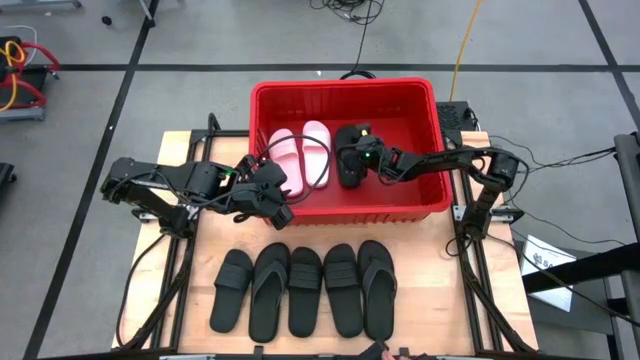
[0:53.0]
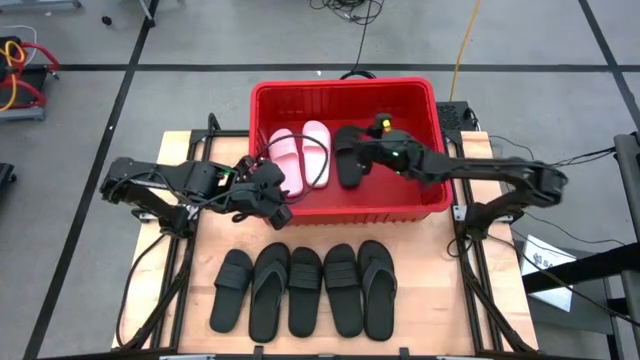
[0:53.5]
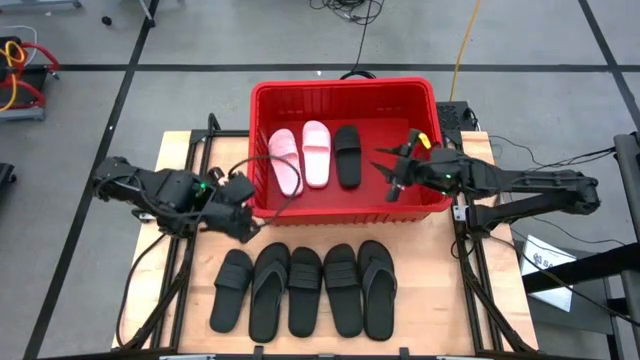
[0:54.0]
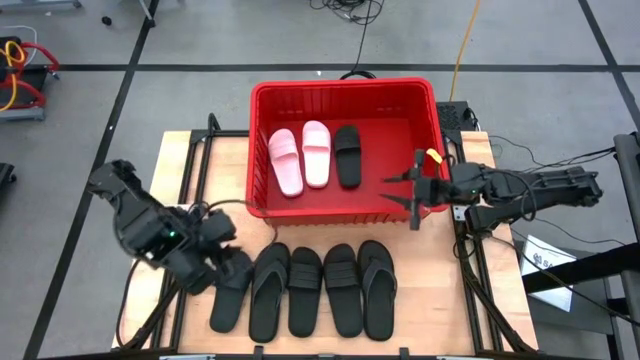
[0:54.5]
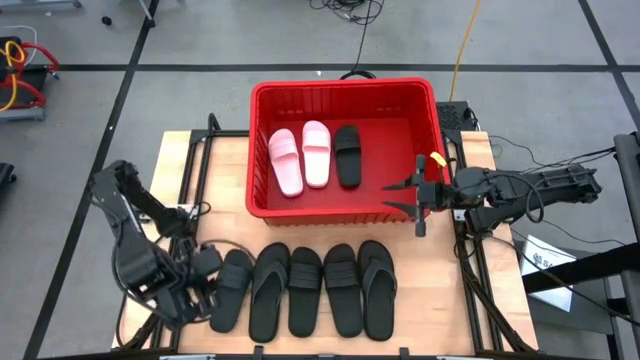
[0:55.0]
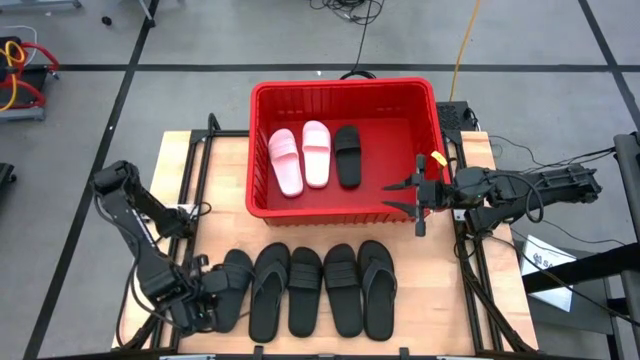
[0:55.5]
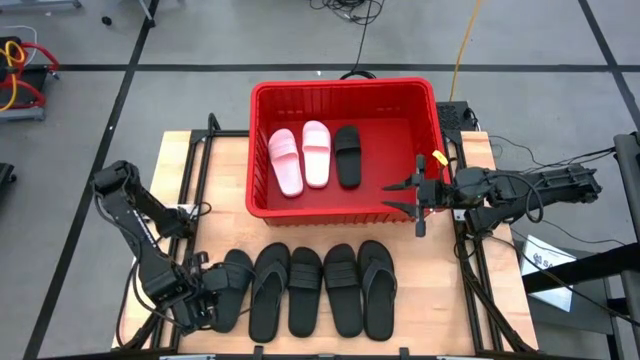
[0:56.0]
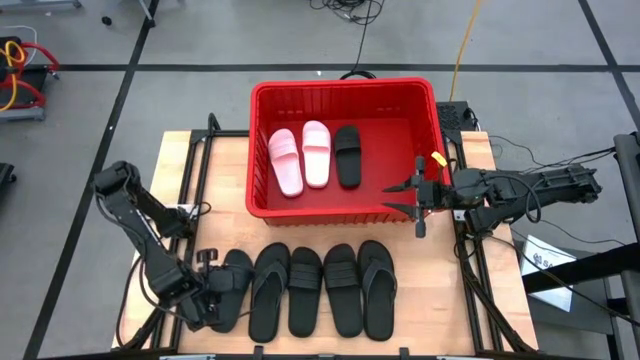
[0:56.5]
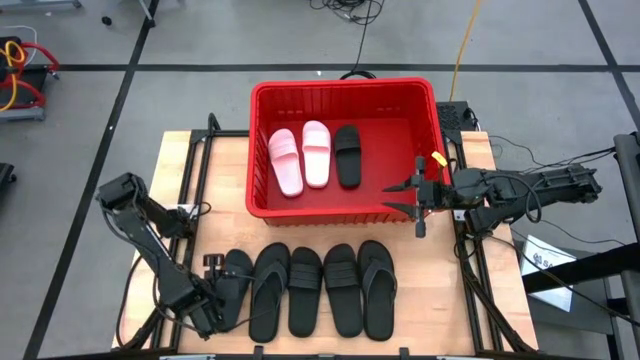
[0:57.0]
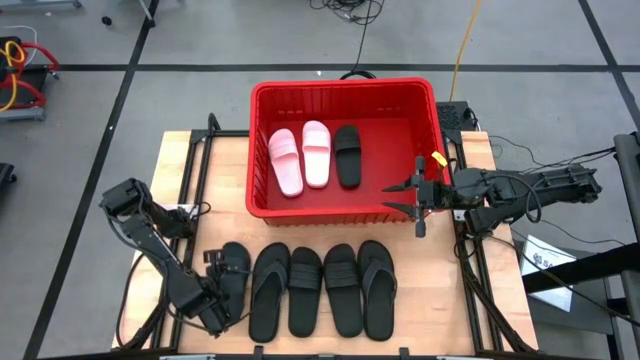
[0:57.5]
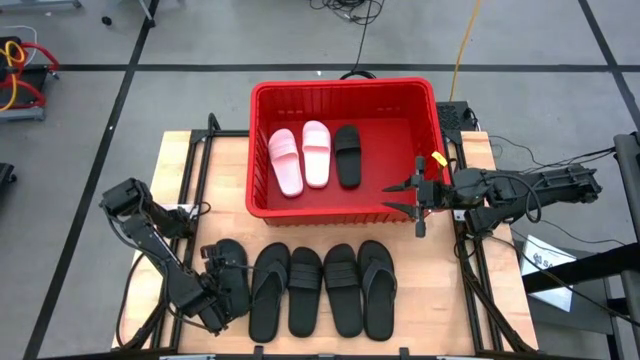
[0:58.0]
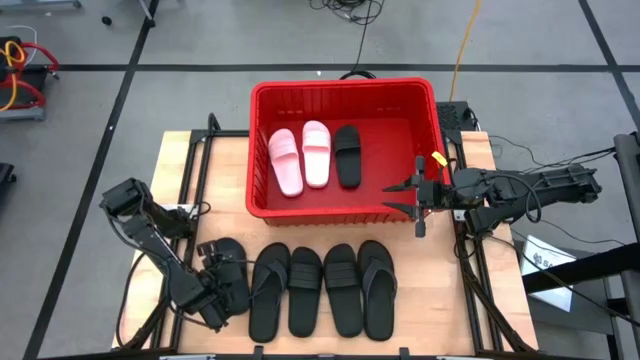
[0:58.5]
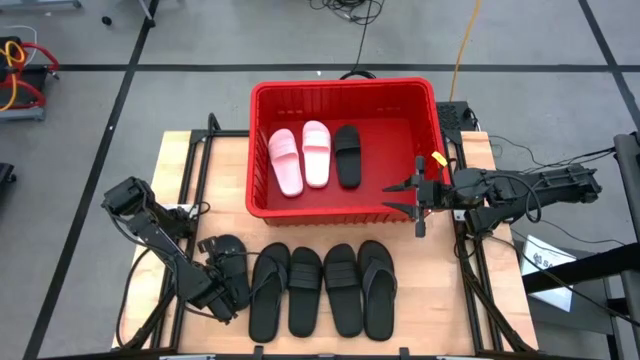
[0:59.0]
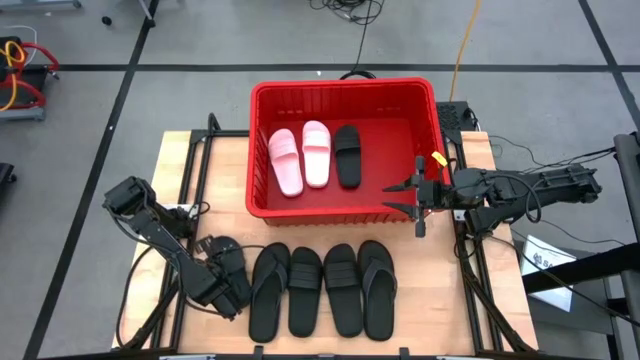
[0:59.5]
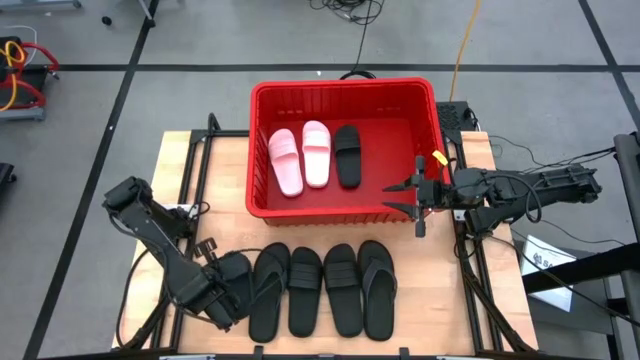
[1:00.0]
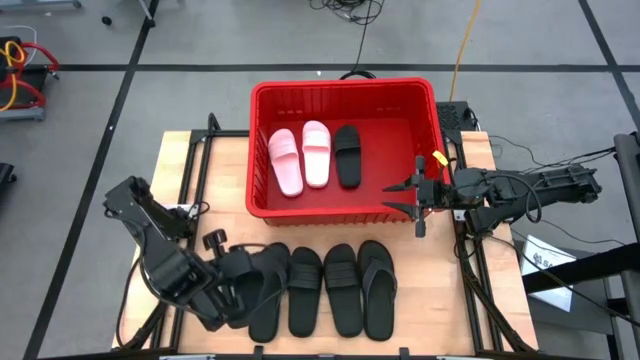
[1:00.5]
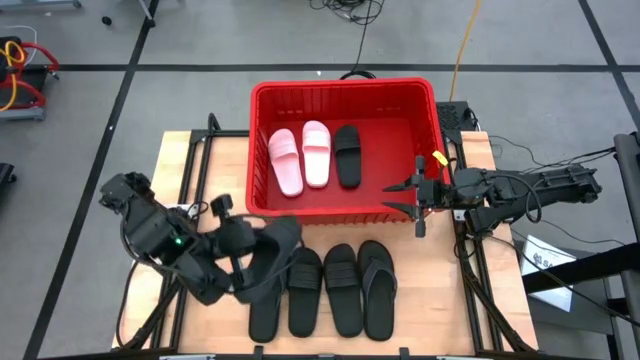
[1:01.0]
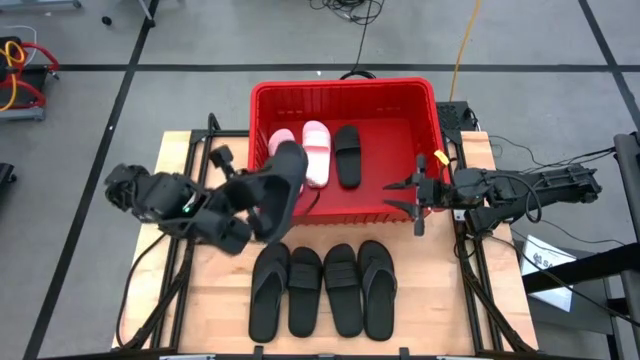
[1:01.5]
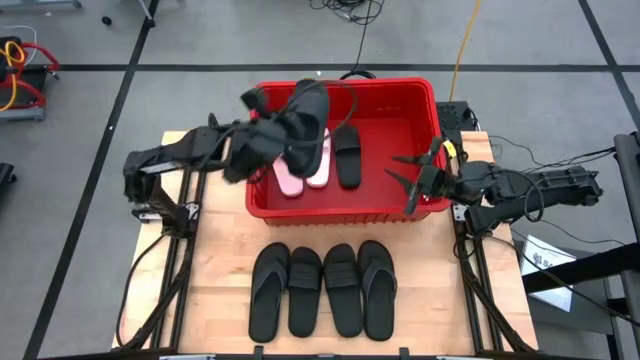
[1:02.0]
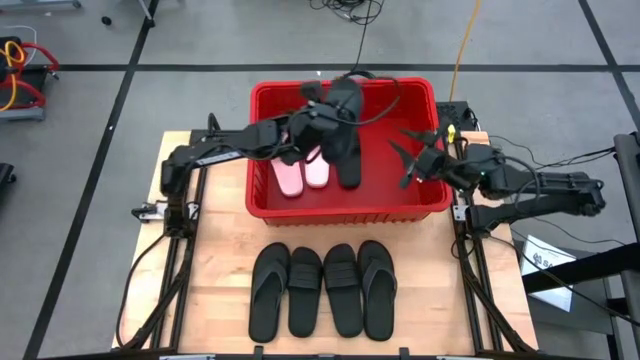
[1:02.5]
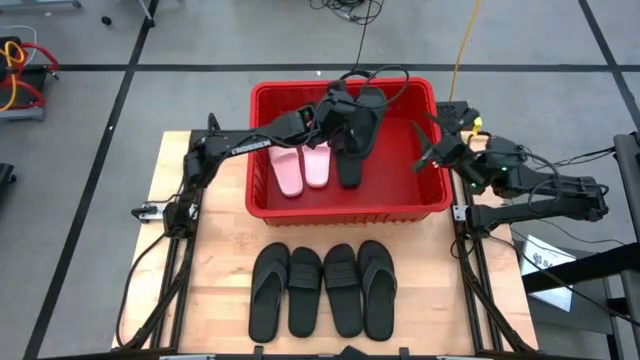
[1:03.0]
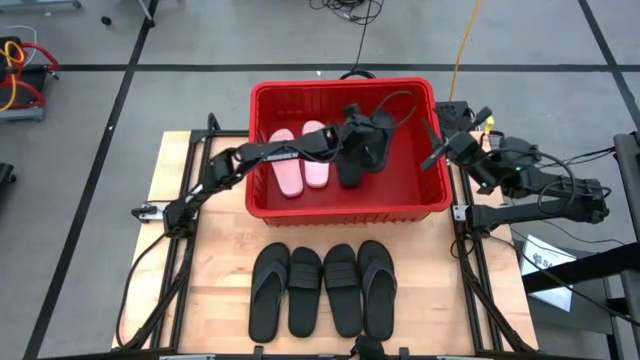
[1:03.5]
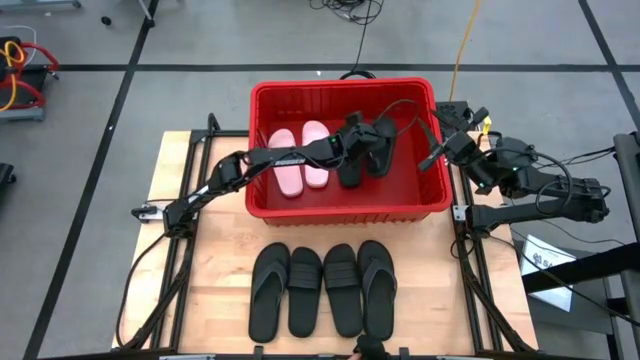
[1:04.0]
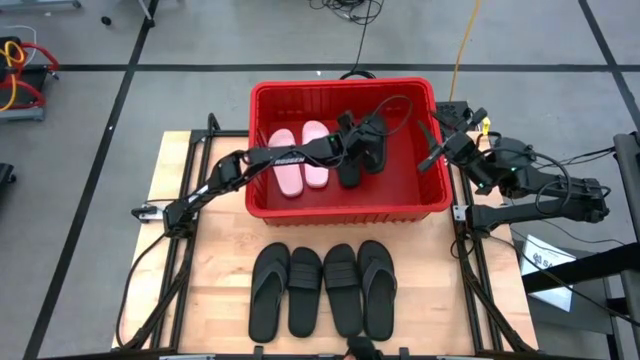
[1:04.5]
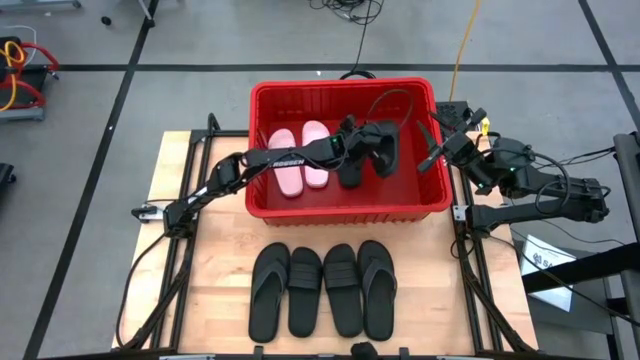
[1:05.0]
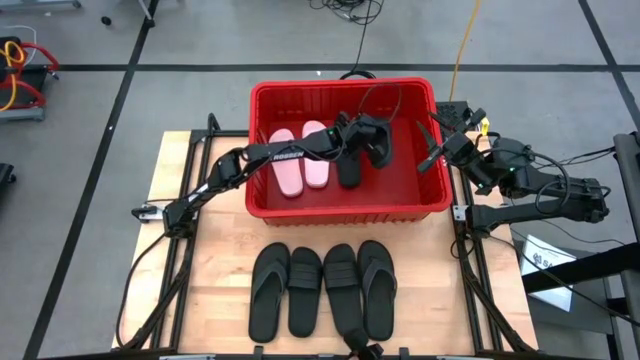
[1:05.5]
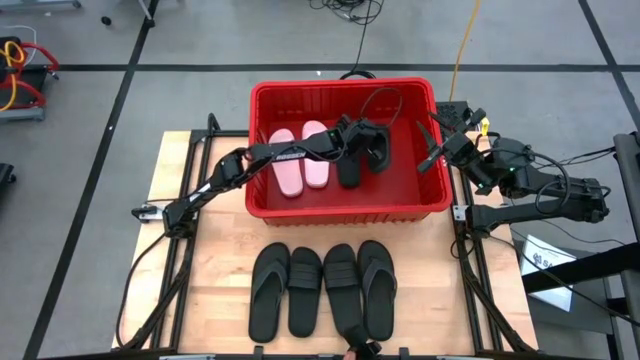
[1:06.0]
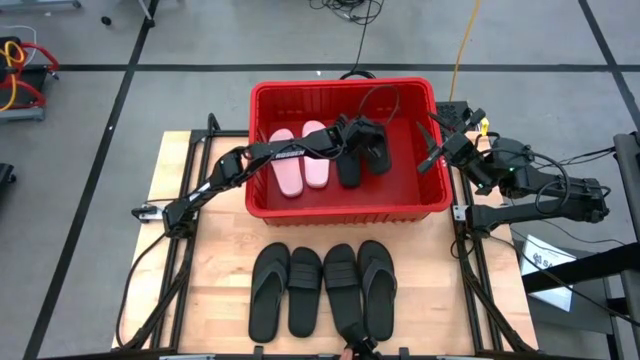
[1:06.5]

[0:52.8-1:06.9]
Task: Pick and place slides into bin
Put the black slide into the red bin

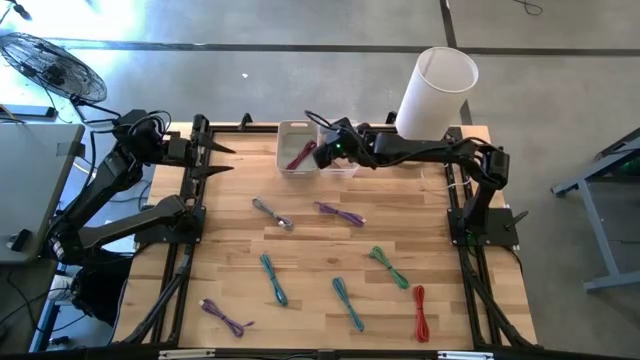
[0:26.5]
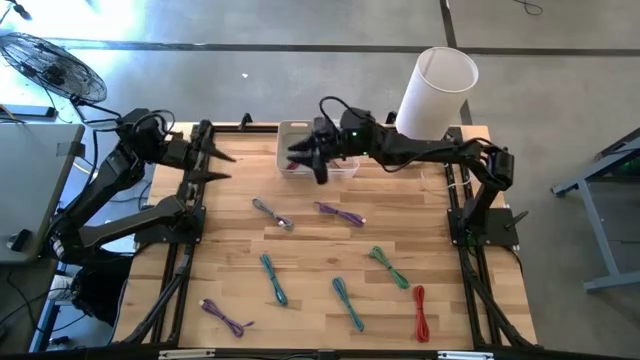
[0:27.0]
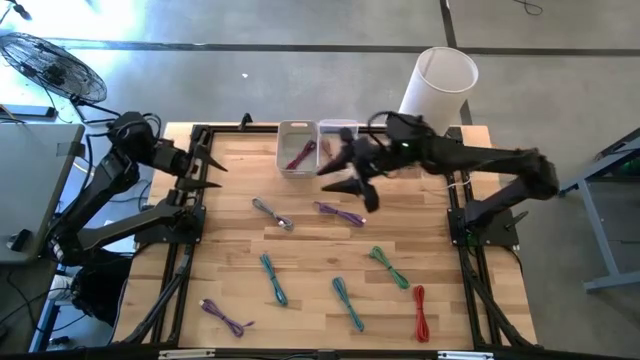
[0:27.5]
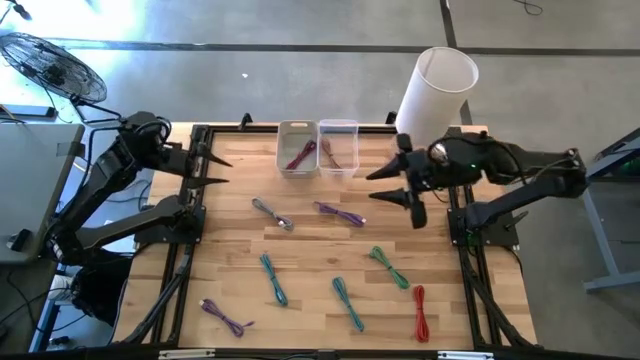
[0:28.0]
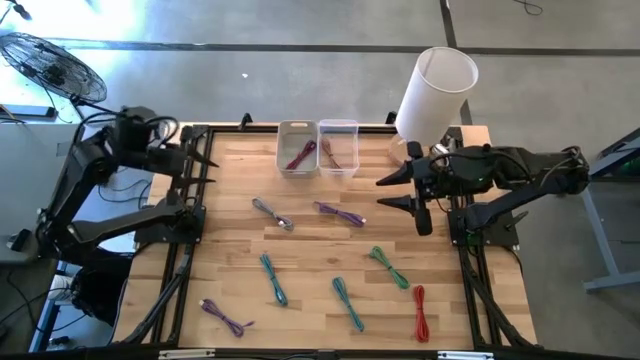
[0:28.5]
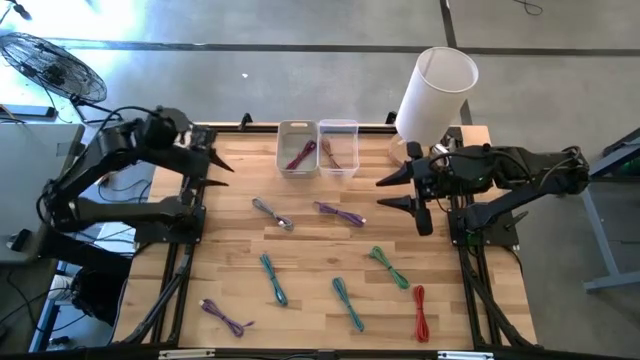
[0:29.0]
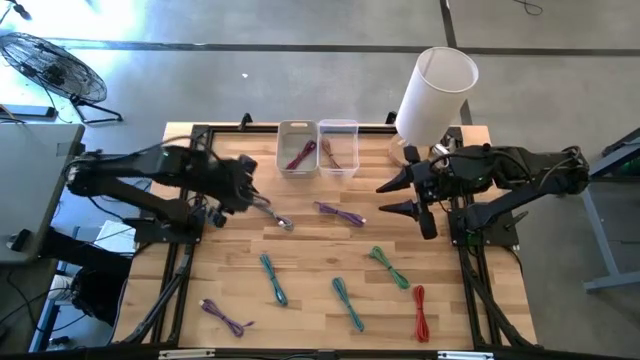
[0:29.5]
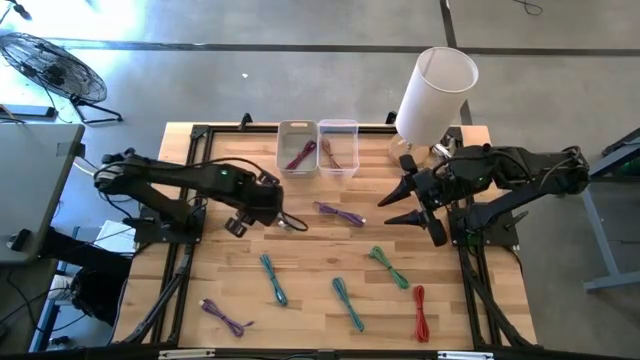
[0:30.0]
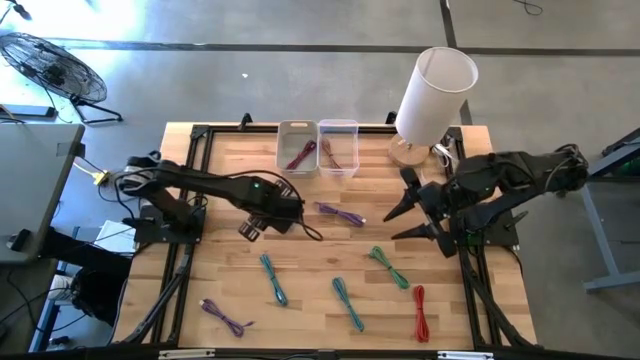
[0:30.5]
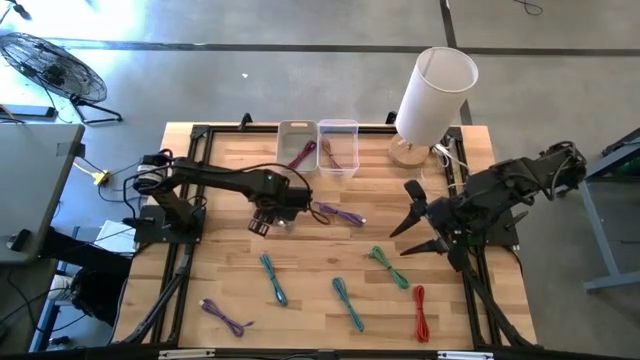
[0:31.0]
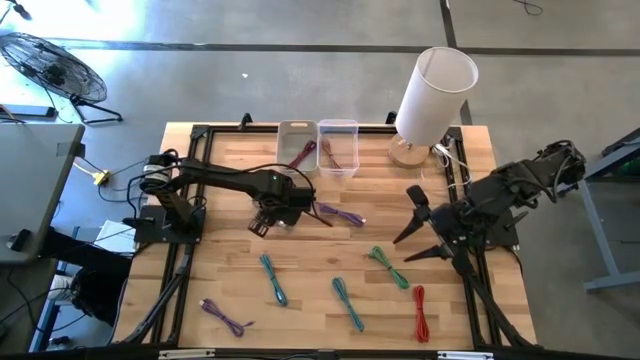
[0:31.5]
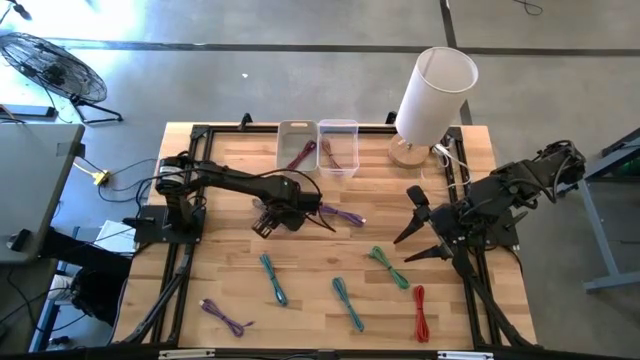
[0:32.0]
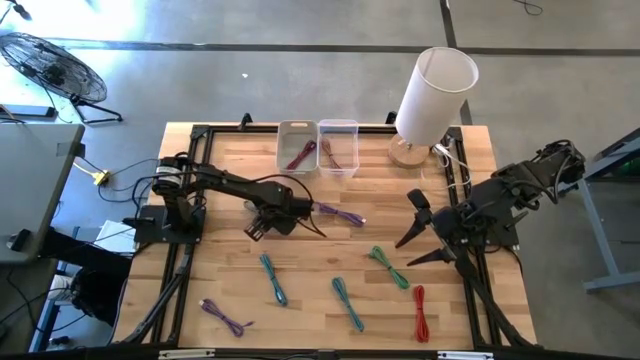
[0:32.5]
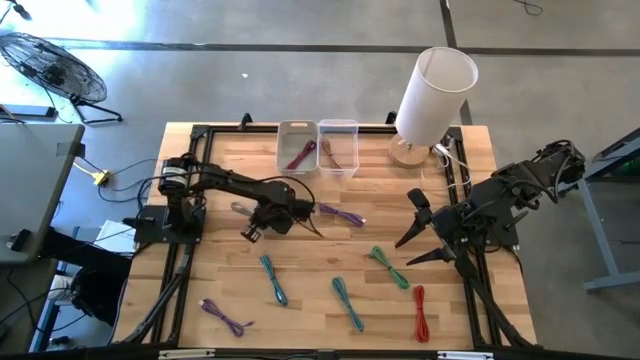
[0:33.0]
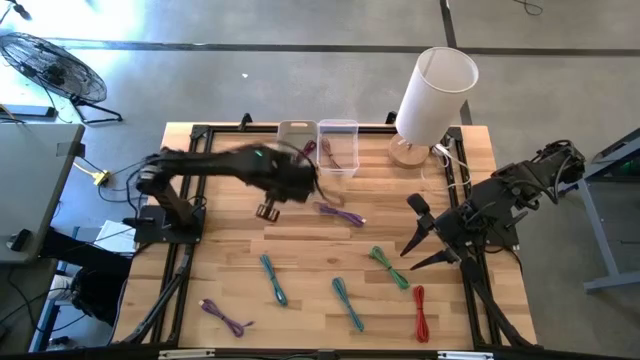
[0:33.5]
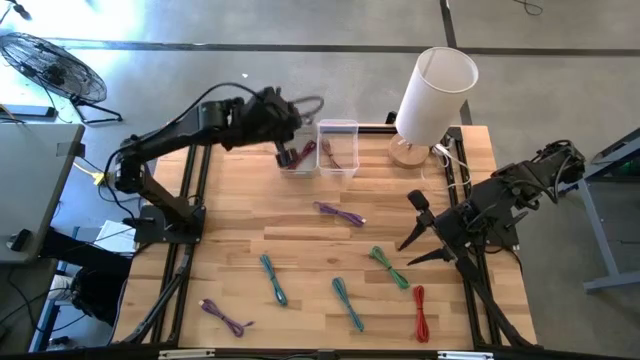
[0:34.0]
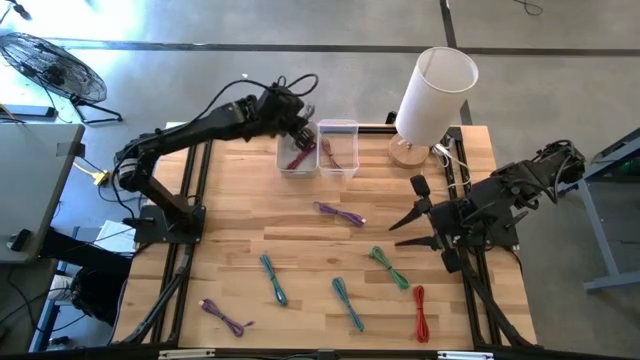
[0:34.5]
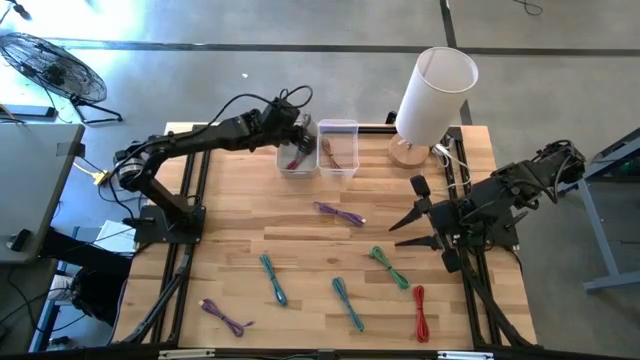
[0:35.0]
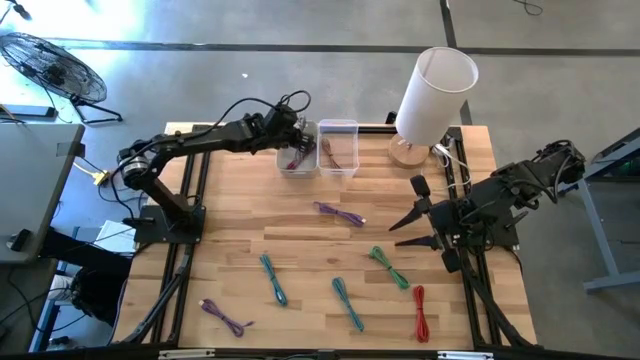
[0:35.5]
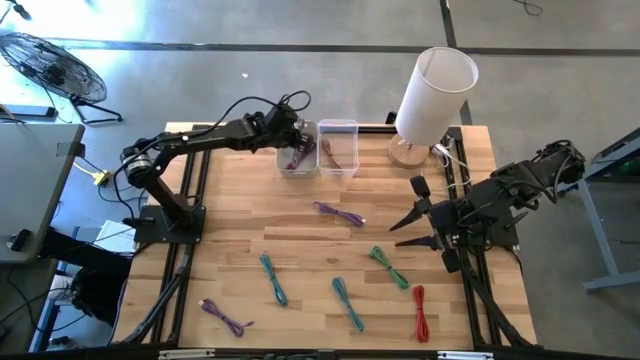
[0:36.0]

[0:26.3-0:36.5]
Task: Pick & Place USB Port
Put the black and white USB cable into the gray bin
